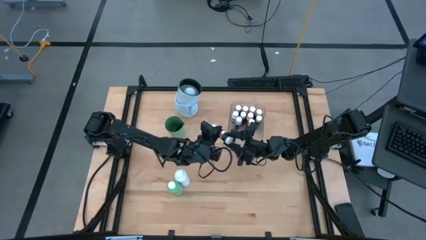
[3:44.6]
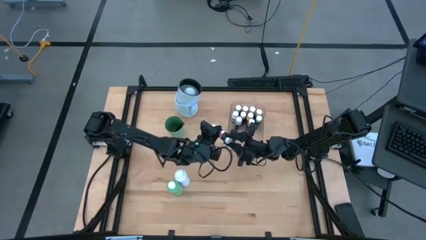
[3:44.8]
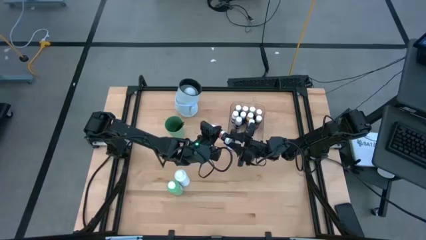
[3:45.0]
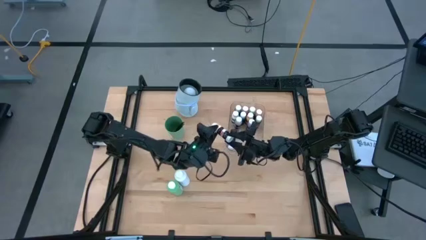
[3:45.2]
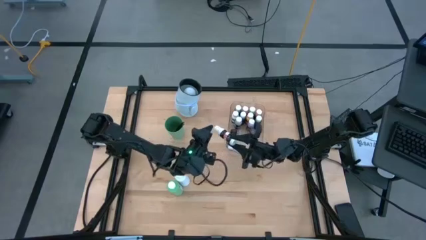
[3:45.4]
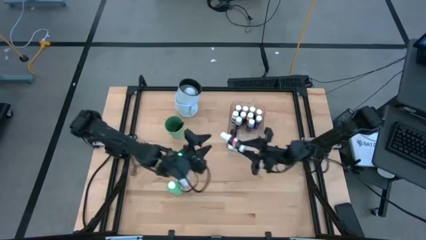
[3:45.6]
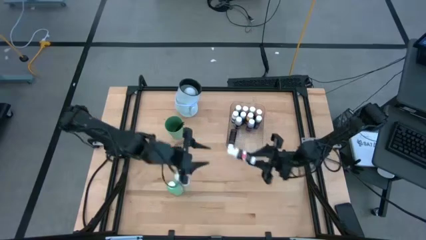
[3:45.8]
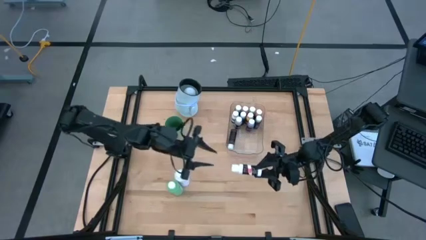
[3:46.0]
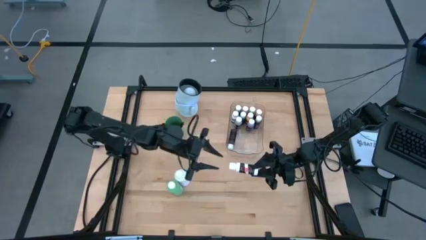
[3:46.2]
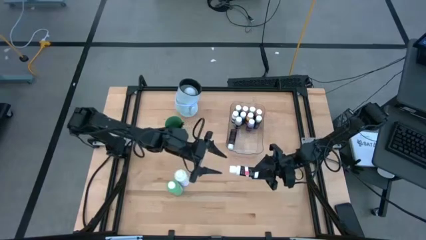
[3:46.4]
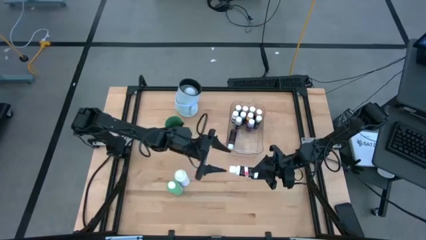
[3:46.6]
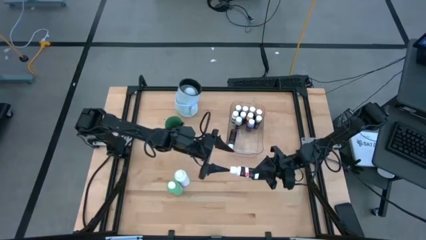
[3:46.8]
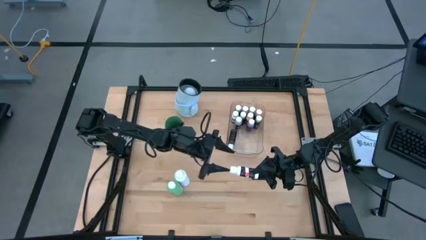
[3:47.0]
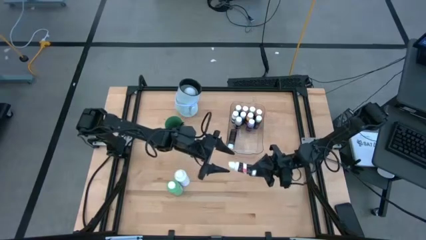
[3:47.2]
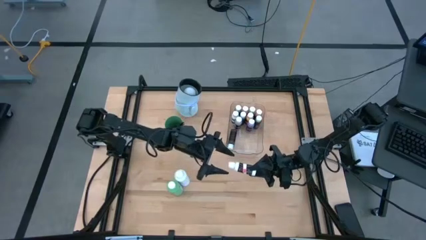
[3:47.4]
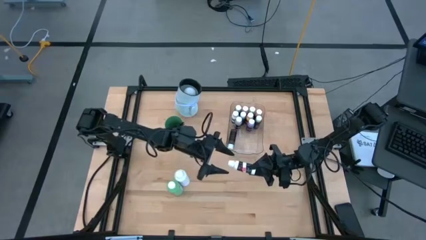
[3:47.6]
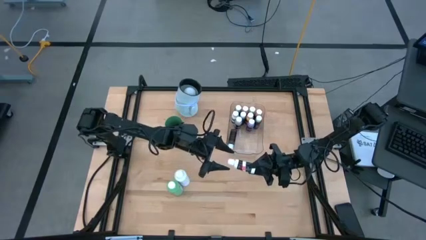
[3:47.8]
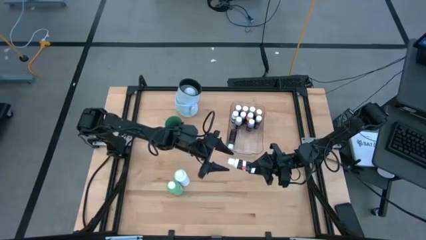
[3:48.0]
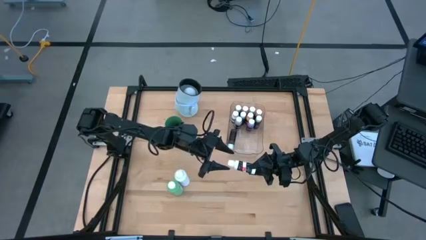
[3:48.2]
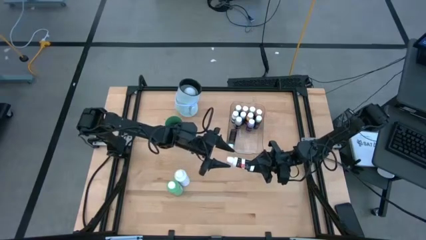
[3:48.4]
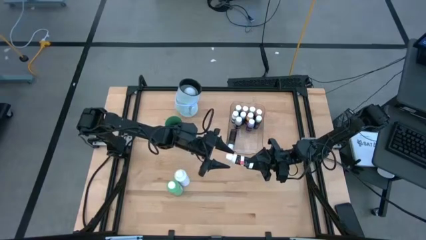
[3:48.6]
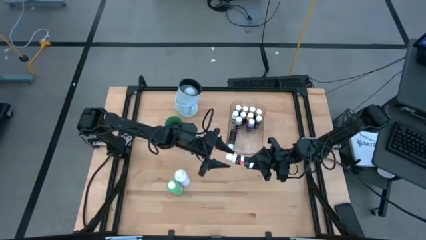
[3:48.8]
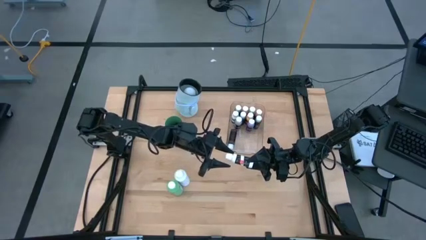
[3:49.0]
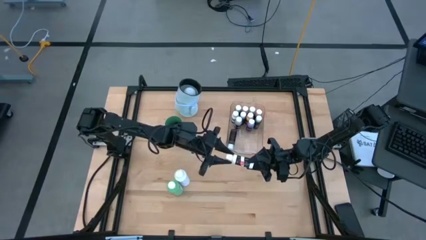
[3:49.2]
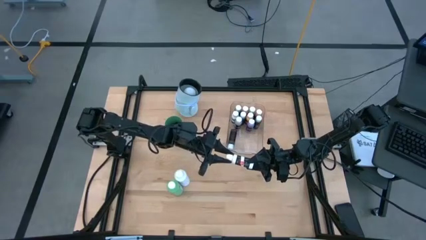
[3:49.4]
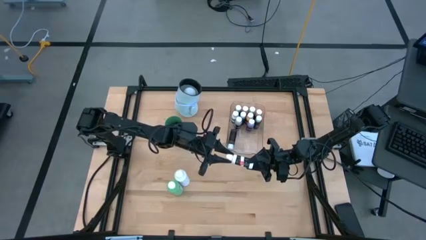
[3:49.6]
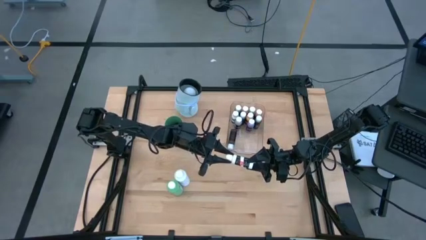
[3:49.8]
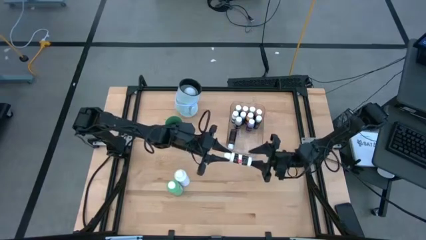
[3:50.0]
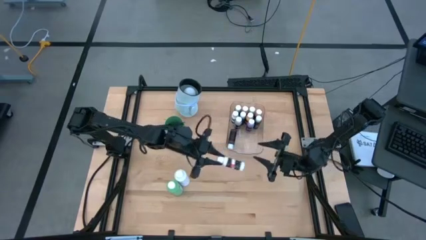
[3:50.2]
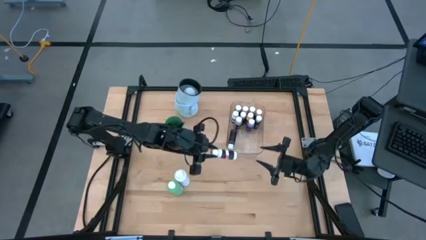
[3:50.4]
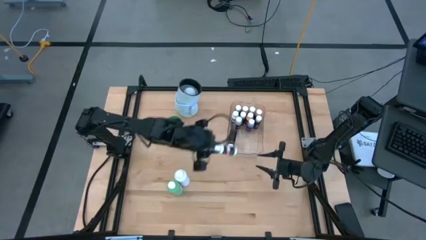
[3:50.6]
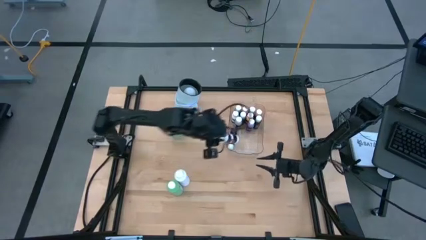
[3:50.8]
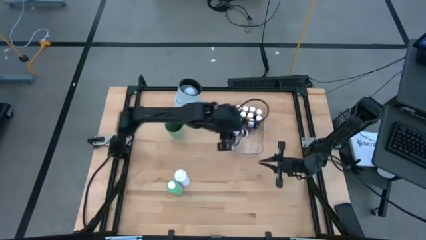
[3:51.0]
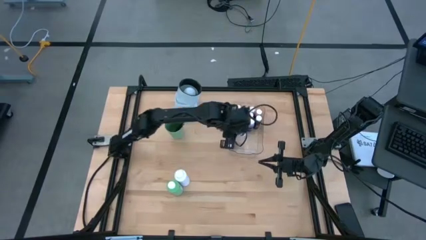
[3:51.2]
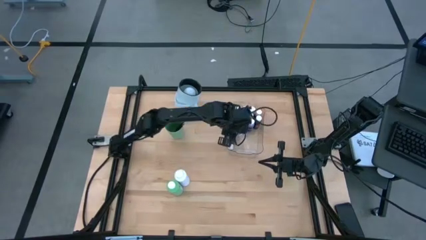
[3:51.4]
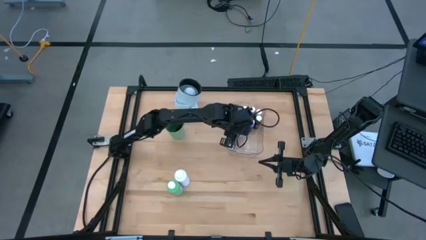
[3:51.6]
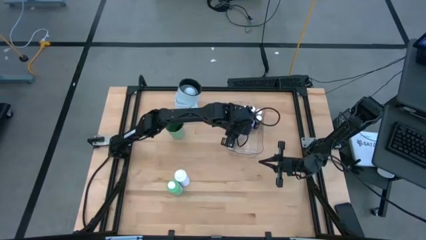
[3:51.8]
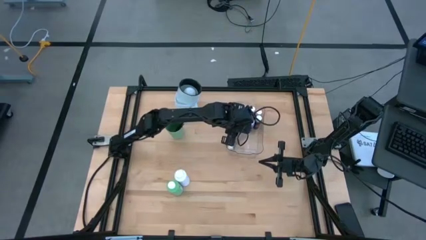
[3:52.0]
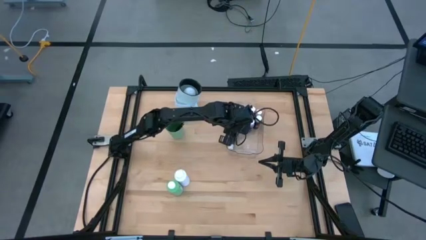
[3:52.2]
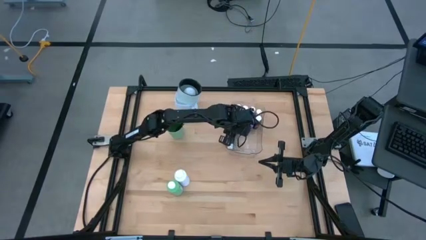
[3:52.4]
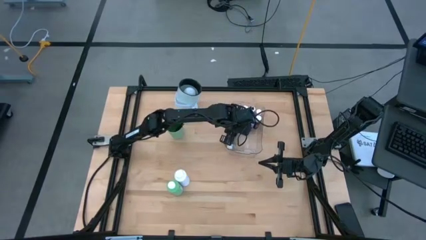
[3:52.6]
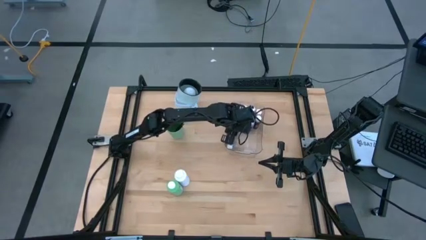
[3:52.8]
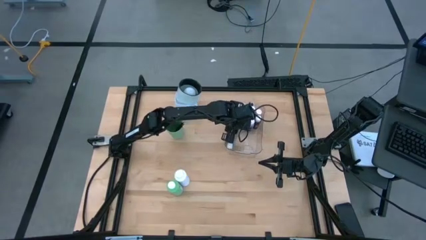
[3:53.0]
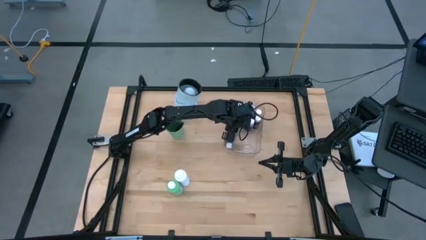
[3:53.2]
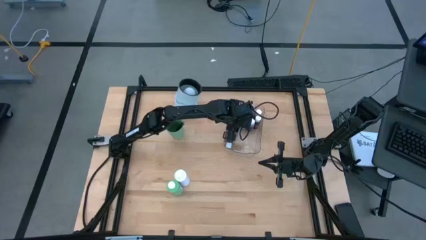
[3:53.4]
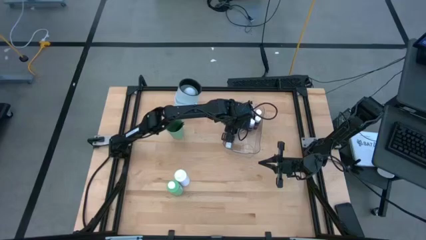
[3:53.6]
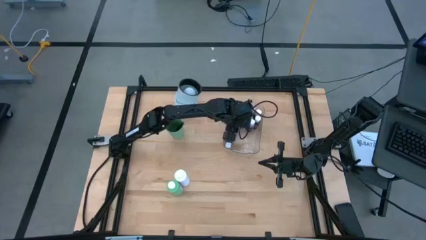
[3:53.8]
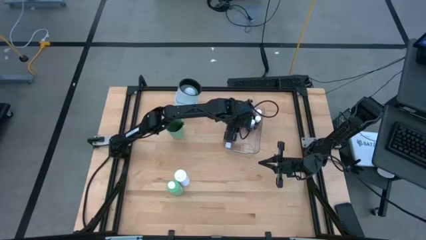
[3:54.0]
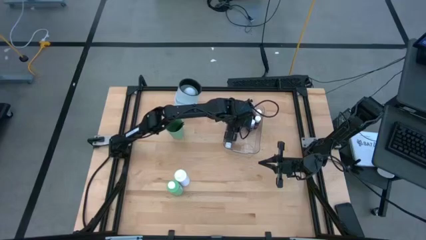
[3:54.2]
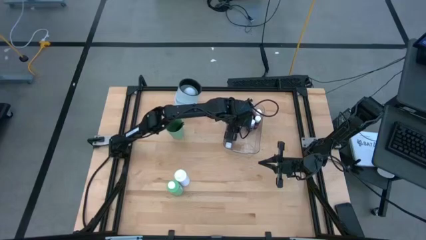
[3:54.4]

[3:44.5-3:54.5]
Task: Pick & Place Paint Supplies
Put the white paint bottle into the transparent bin
